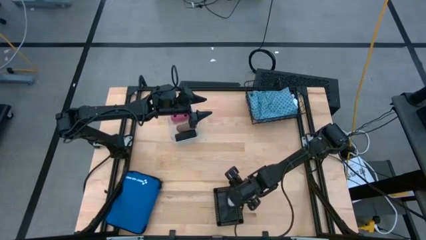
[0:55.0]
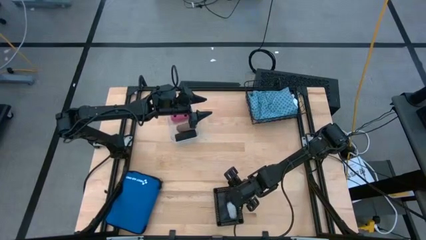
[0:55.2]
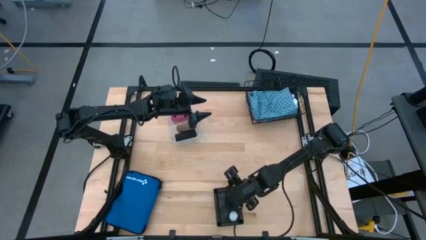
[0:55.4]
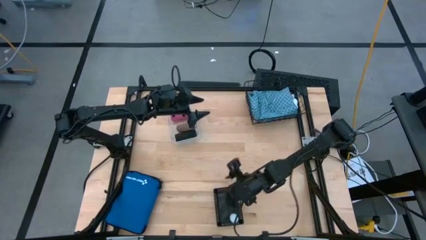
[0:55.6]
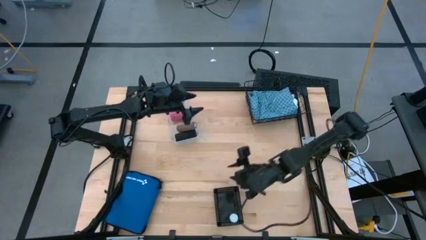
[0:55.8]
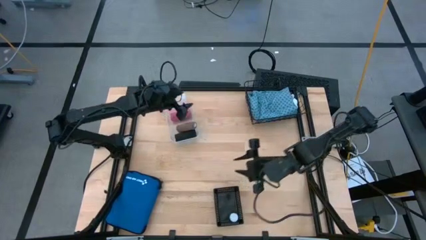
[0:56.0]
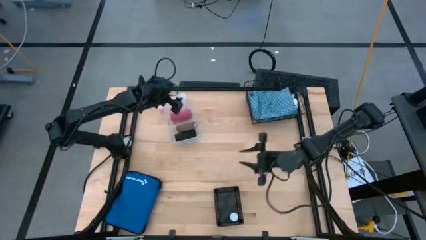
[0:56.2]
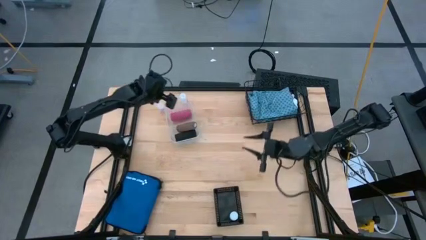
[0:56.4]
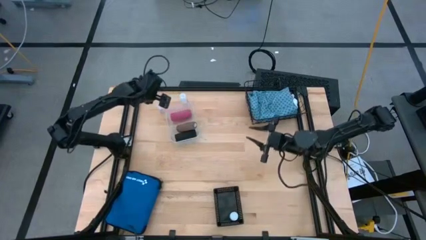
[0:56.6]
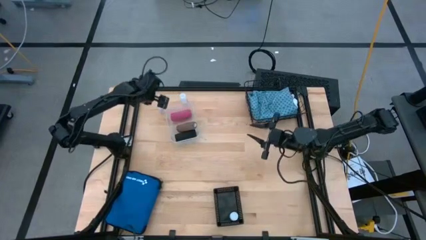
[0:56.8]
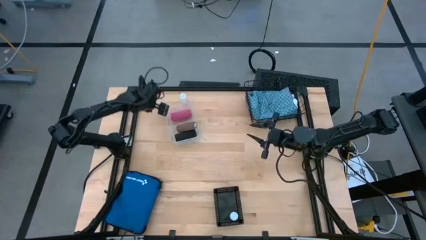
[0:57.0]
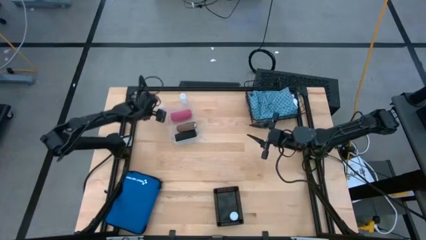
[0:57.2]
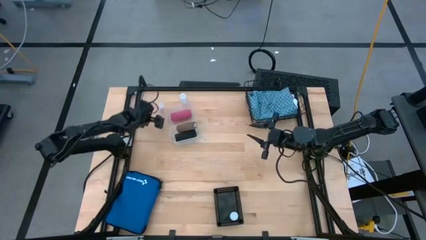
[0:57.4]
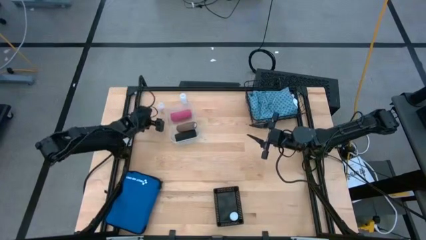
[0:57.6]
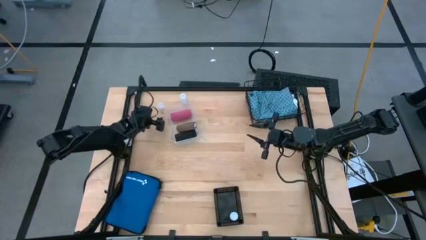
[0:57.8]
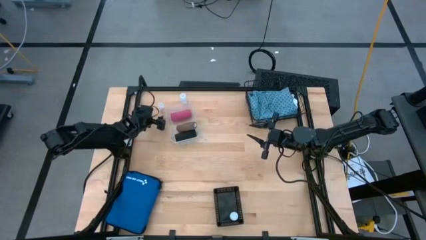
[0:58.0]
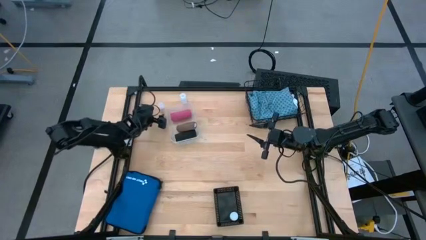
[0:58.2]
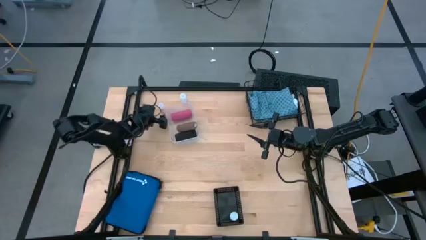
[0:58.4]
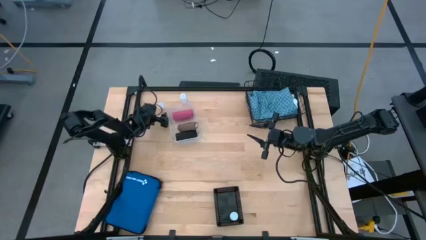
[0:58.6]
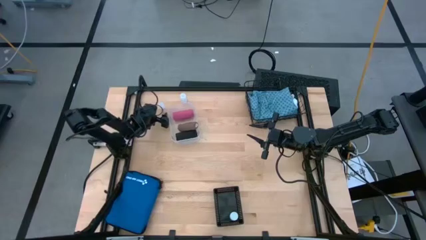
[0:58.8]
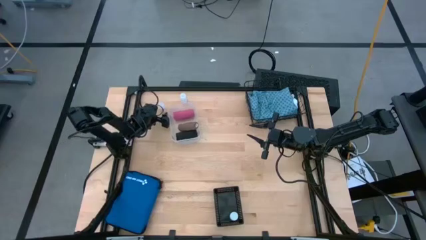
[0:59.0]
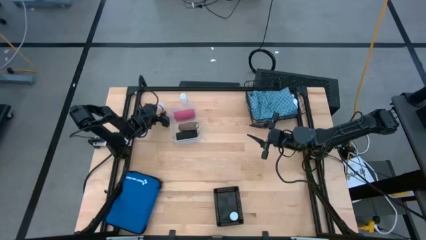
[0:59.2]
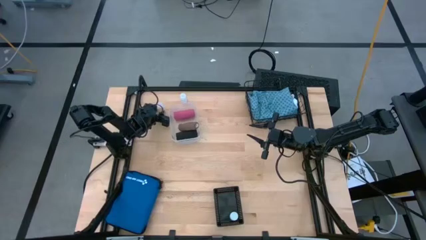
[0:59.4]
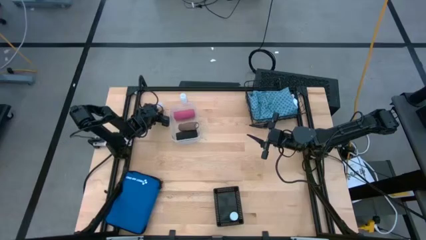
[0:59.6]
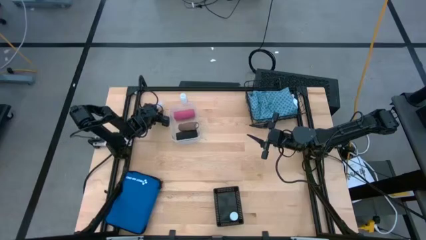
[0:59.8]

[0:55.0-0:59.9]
Task: Pick & Place Medicine items
Put the left transparent pill bottle into the black bin

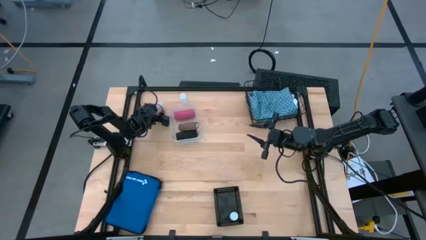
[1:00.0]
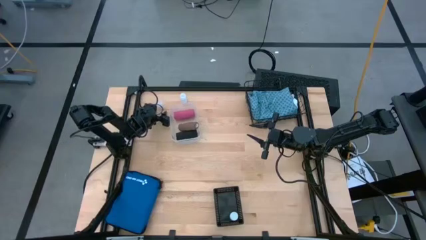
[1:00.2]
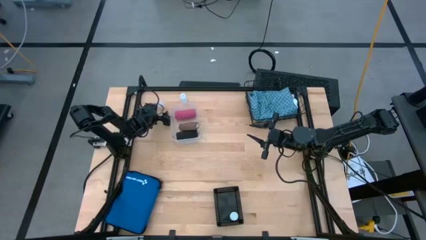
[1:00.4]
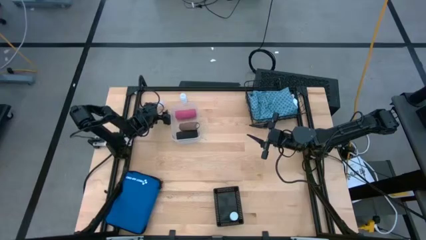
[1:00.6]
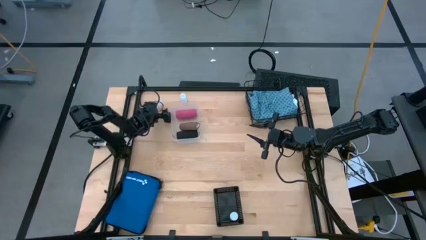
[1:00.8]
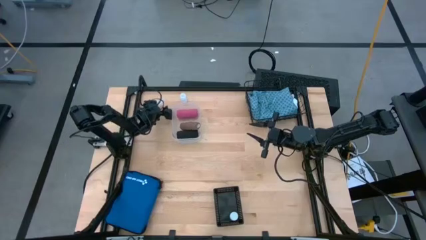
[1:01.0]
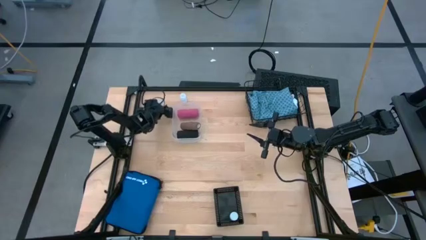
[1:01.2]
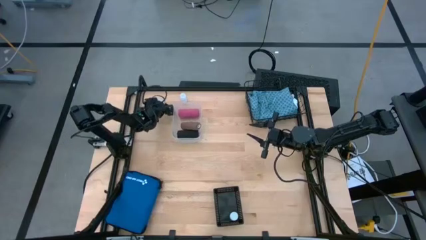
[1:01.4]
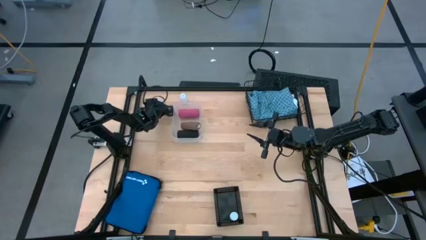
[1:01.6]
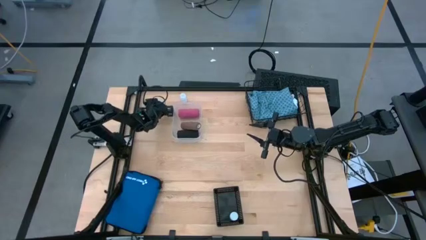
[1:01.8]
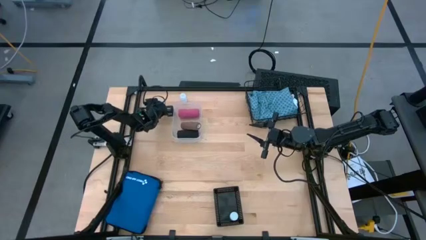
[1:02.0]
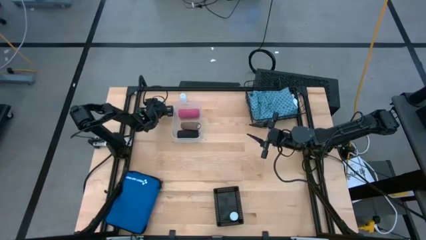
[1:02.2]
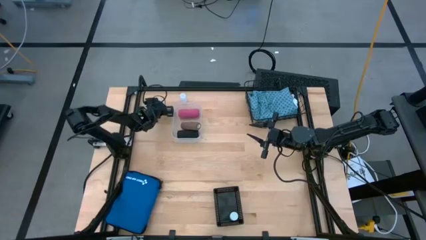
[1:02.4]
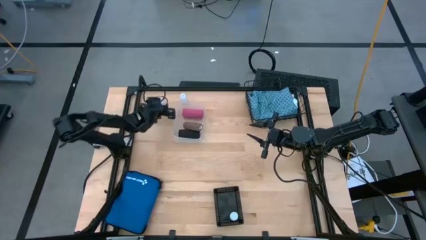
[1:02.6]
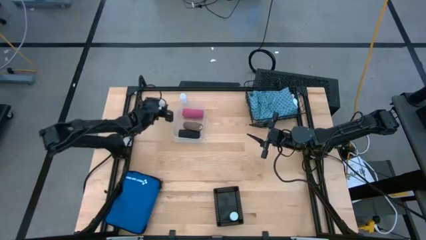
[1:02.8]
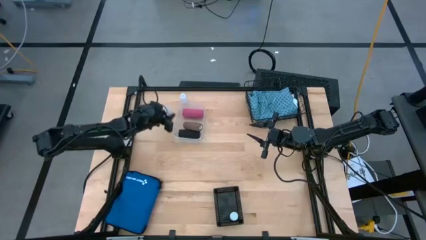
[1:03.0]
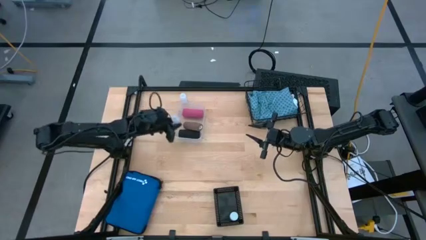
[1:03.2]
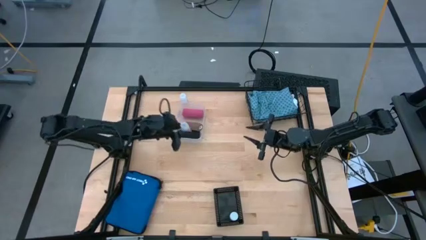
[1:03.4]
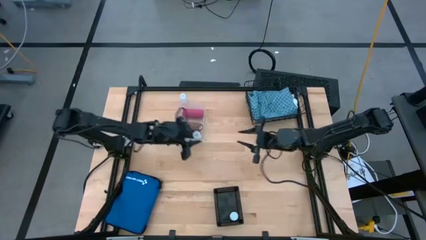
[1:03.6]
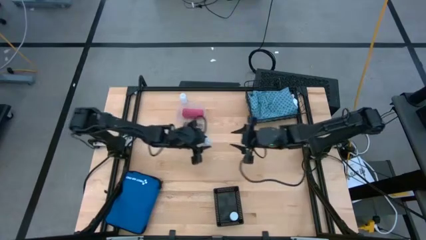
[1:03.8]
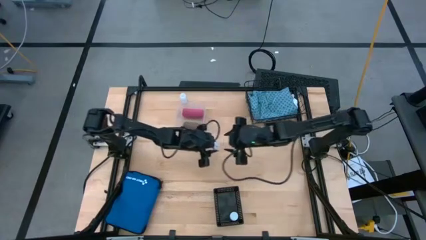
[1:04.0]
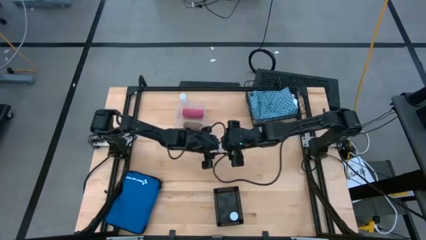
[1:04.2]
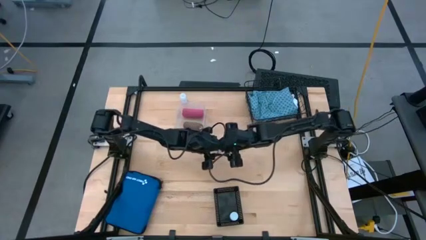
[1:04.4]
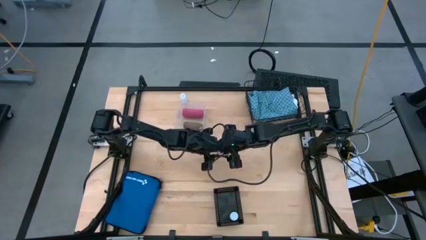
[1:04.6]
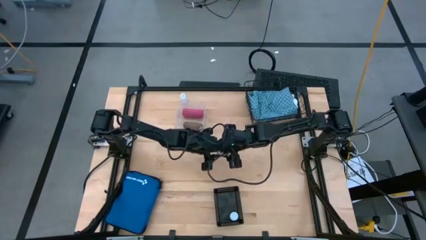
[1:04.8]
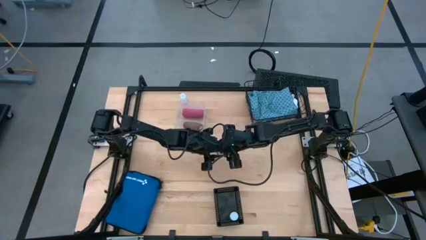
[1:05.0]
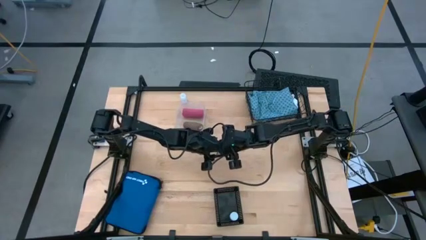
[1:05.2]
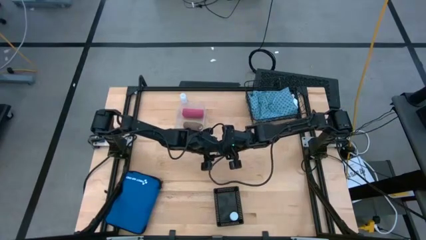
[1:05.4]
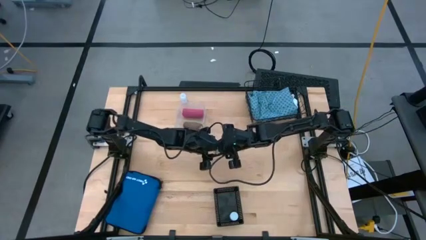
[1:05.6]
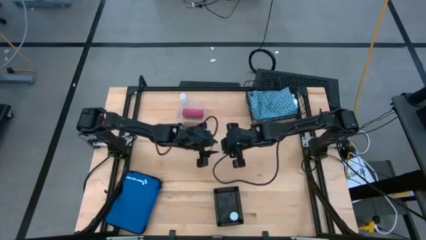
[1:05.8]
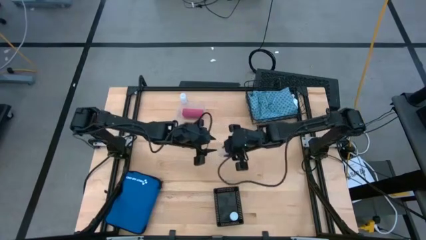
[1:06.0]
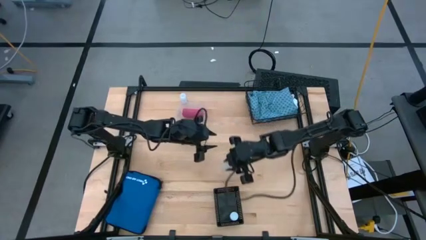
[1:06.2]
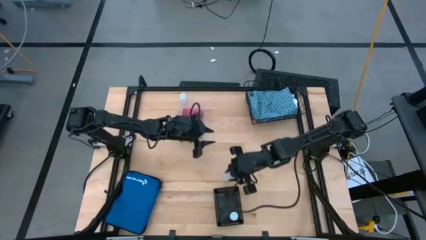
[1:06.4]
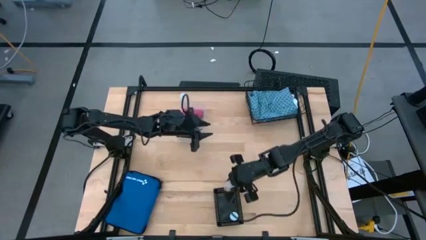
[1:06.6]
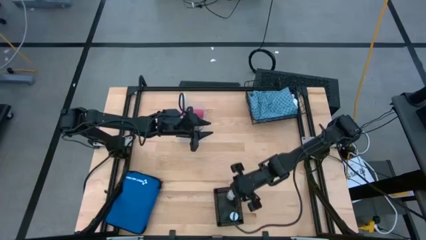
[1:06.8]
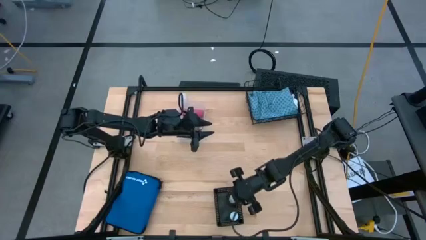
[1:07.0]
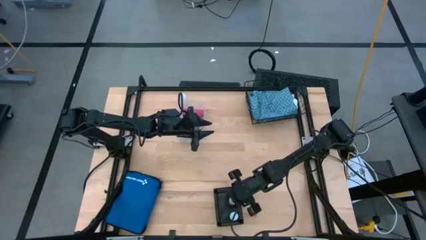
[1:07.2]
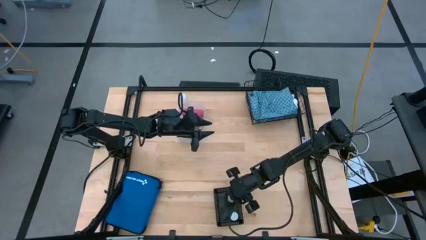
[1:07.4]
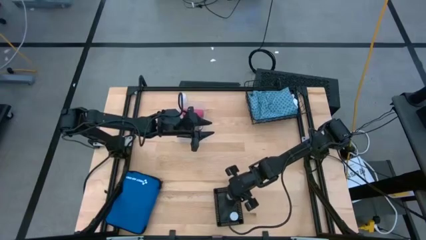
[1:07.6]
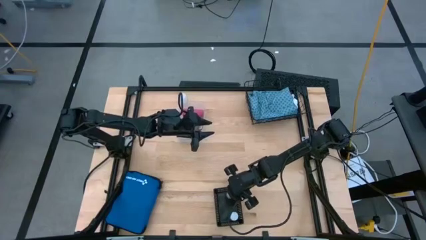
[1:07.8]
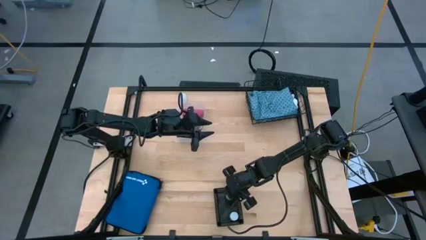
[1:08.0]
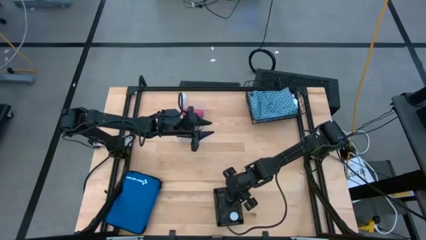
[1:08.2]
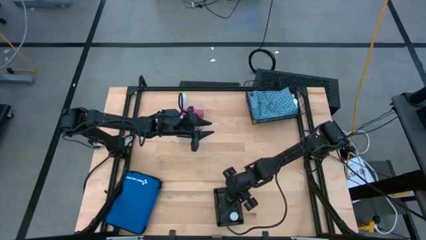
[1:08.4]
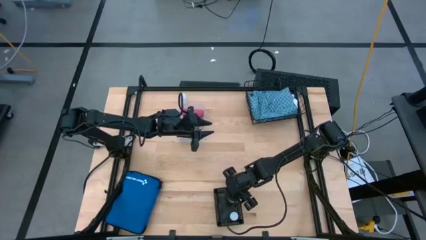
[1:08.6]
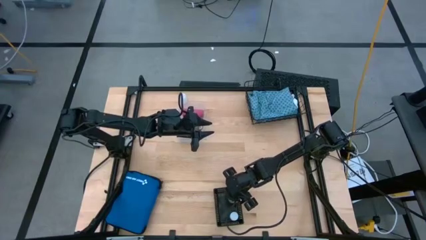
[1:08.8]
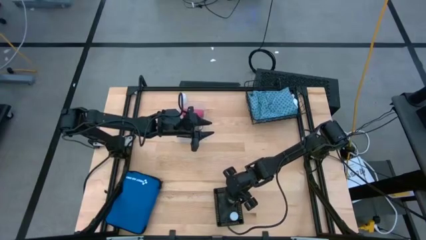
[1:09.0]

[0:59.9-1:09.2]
Put the left transparent pill bottle into the black bin
